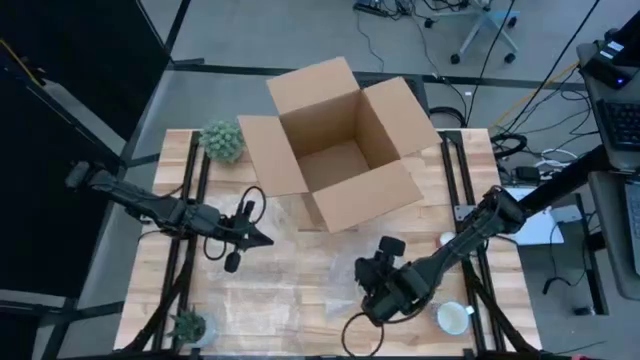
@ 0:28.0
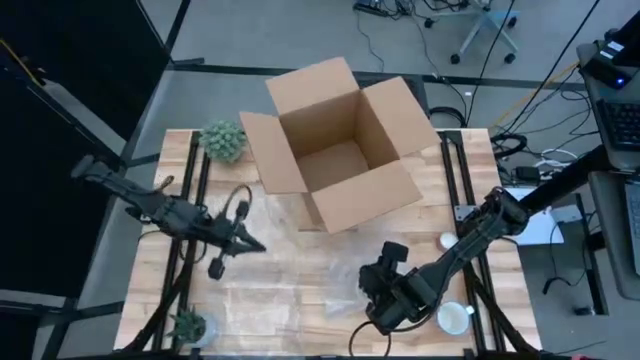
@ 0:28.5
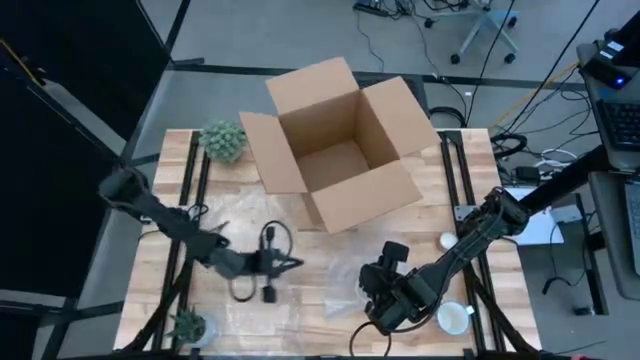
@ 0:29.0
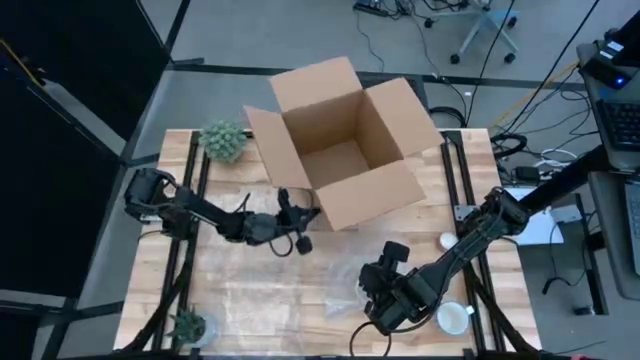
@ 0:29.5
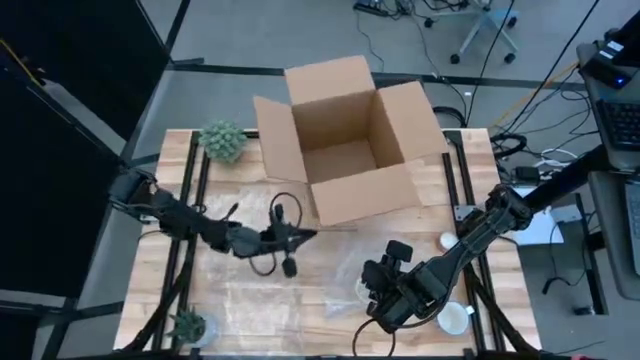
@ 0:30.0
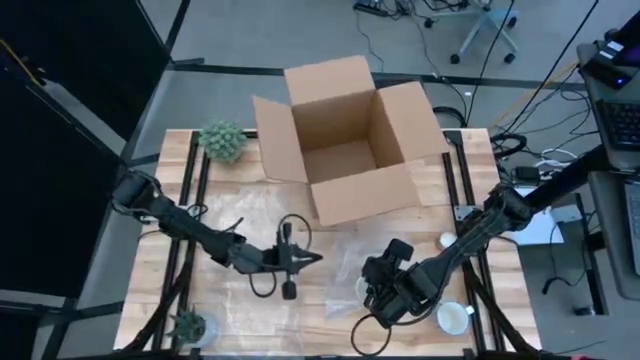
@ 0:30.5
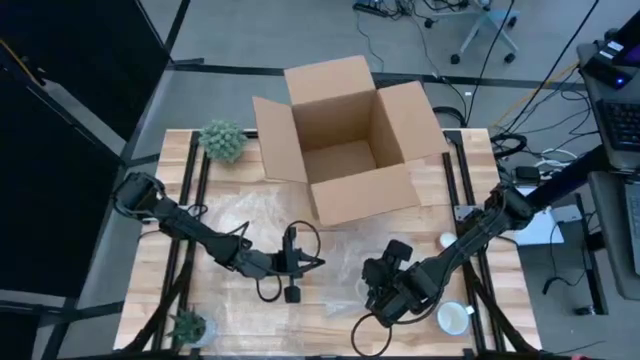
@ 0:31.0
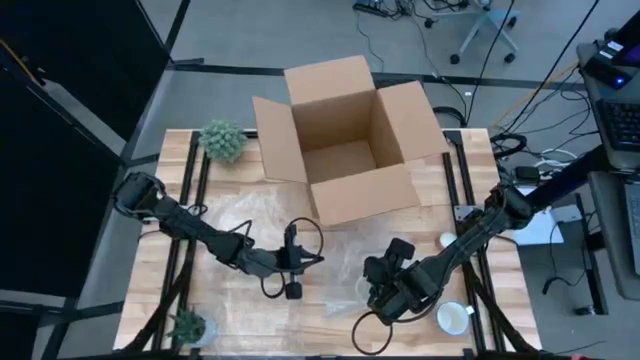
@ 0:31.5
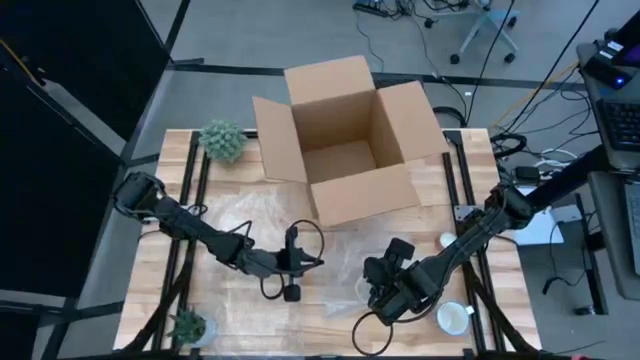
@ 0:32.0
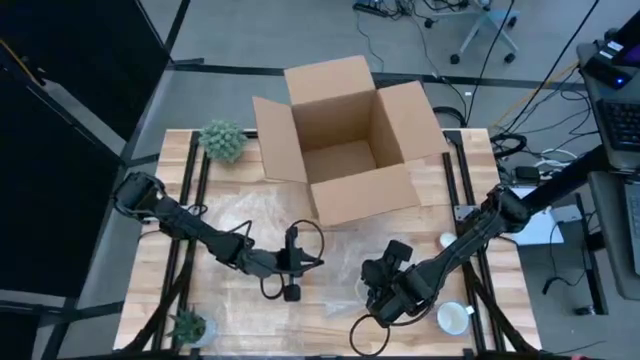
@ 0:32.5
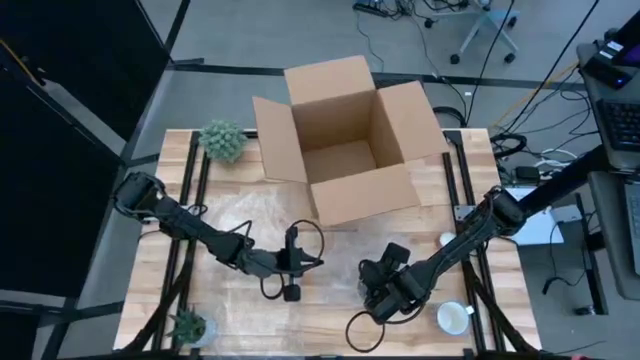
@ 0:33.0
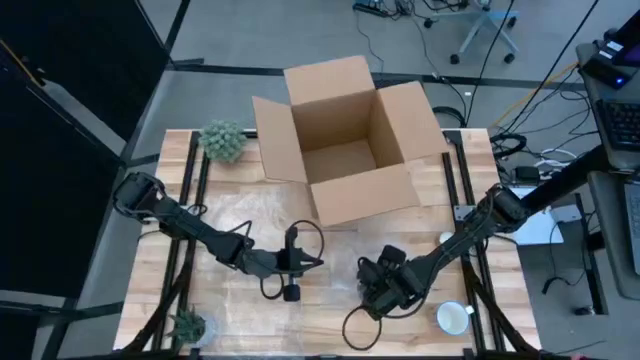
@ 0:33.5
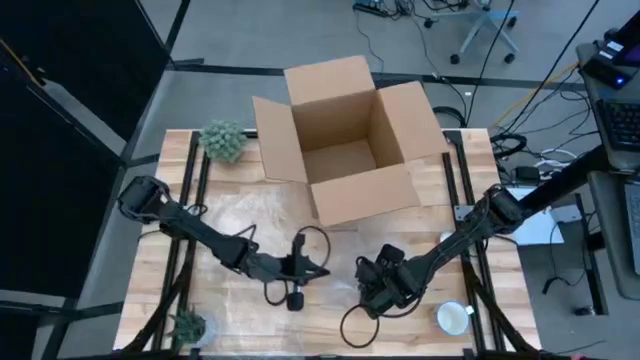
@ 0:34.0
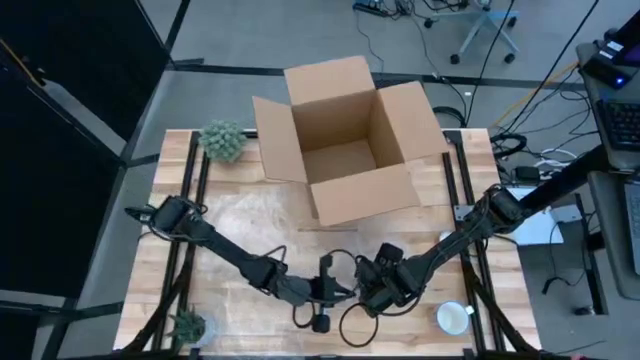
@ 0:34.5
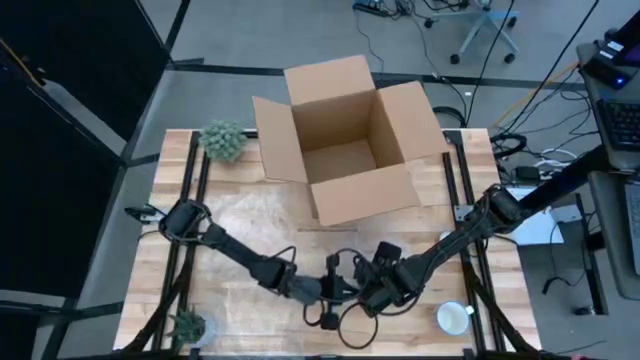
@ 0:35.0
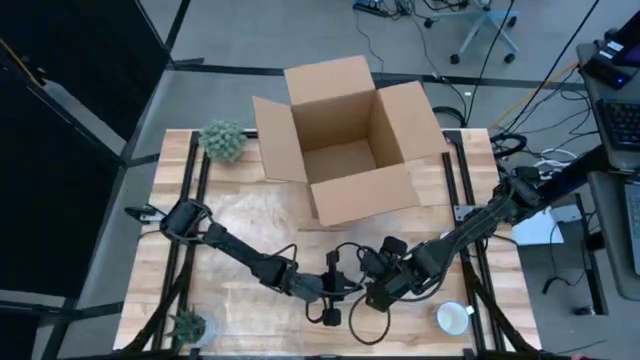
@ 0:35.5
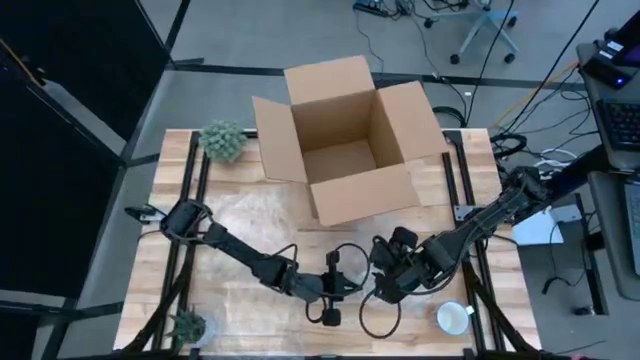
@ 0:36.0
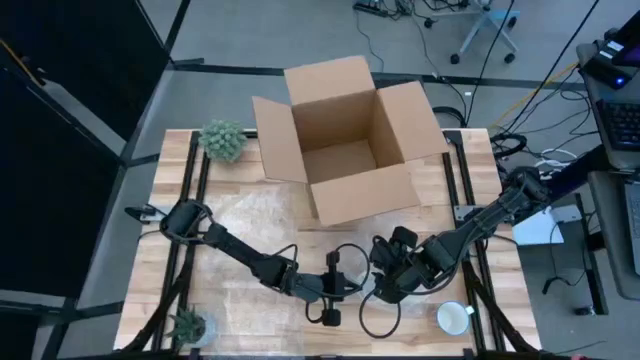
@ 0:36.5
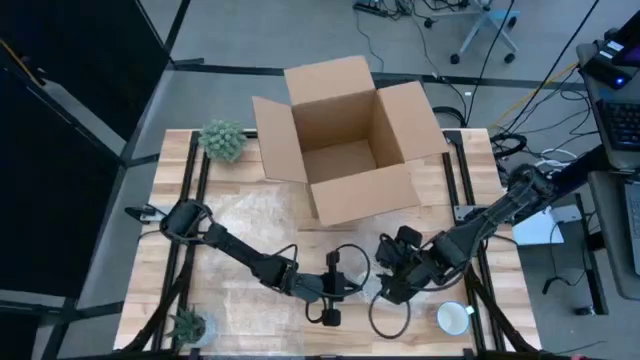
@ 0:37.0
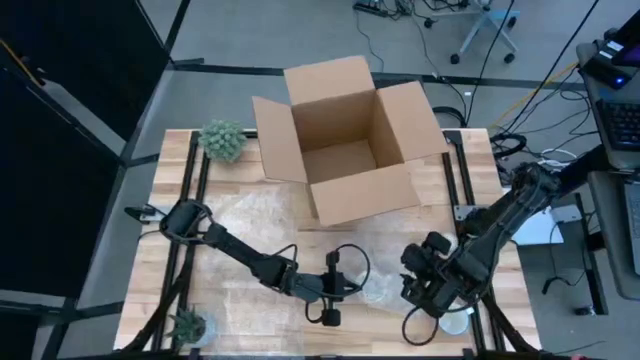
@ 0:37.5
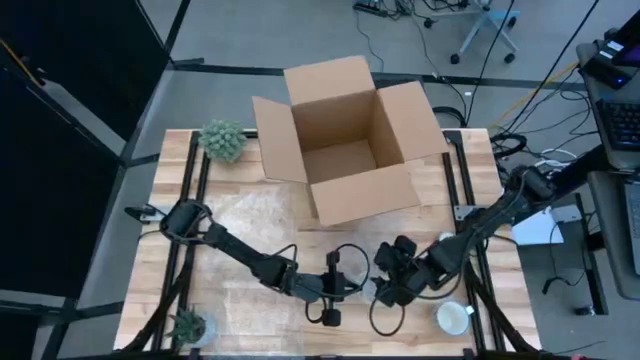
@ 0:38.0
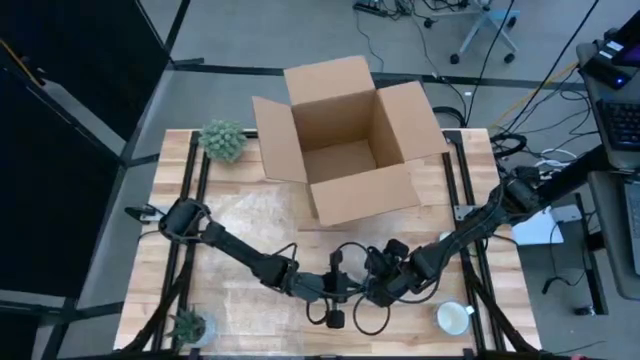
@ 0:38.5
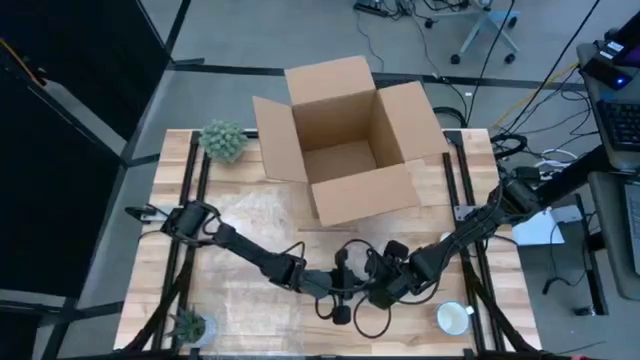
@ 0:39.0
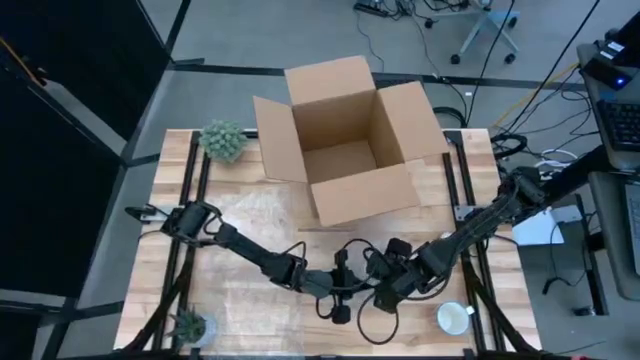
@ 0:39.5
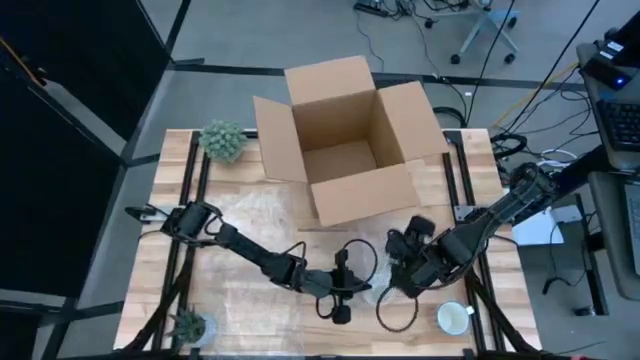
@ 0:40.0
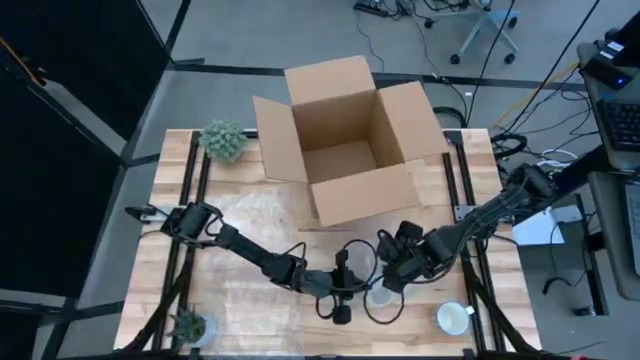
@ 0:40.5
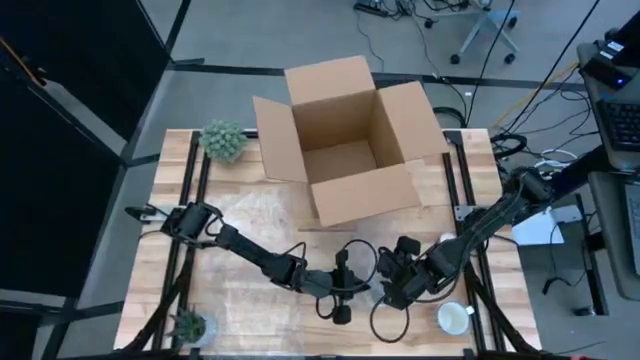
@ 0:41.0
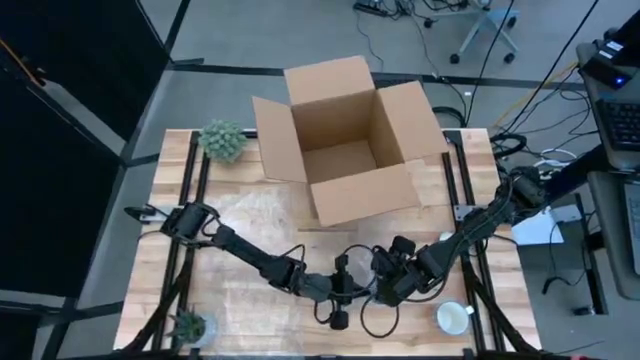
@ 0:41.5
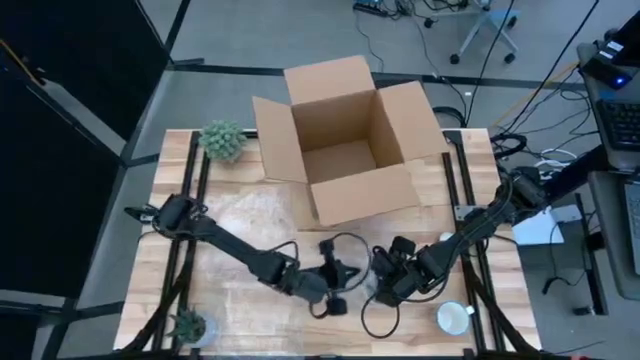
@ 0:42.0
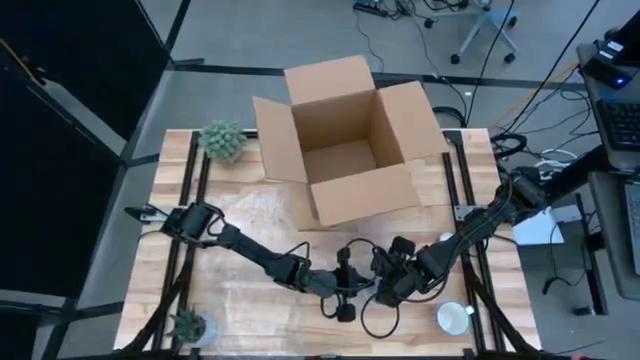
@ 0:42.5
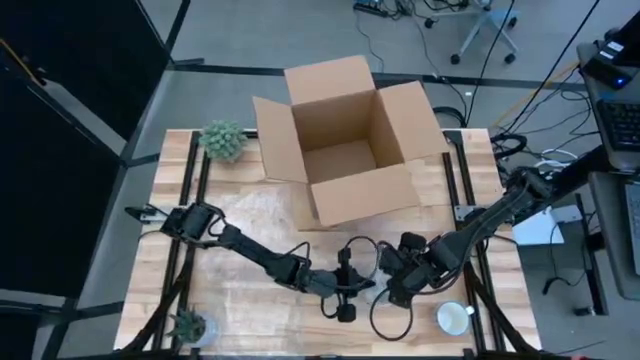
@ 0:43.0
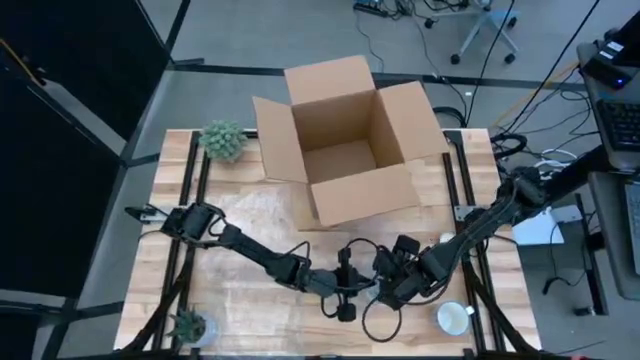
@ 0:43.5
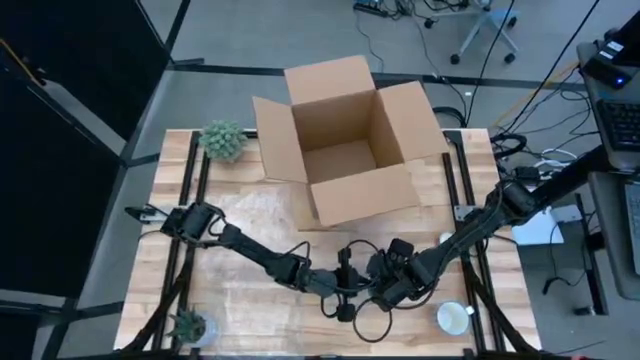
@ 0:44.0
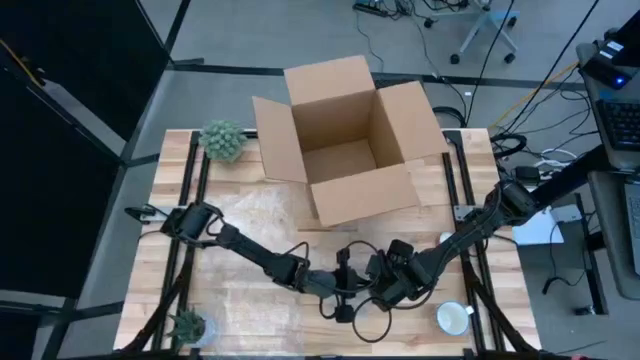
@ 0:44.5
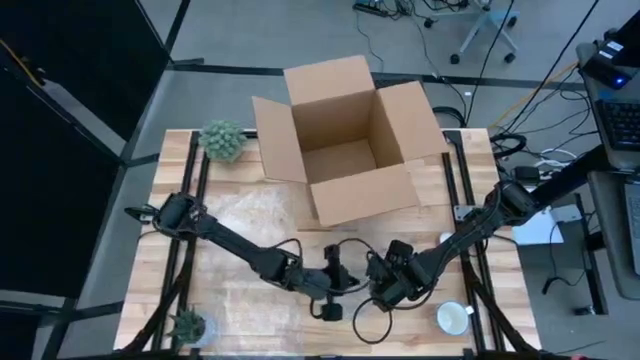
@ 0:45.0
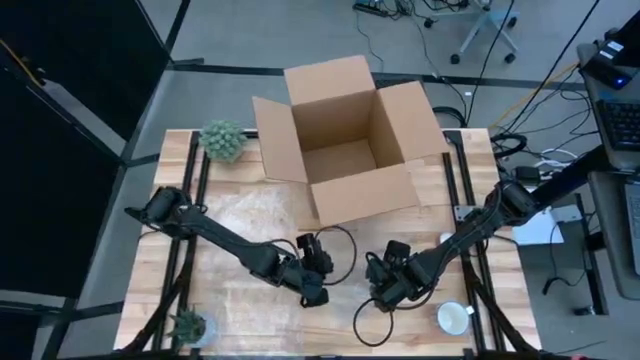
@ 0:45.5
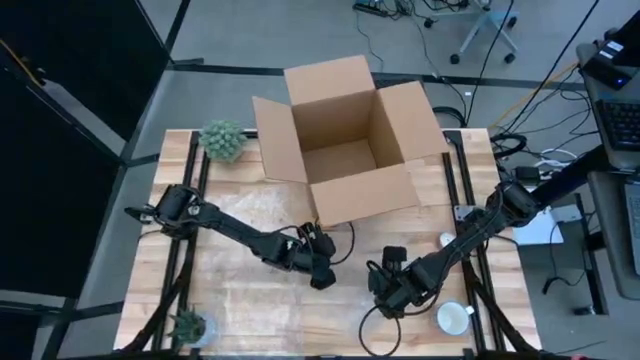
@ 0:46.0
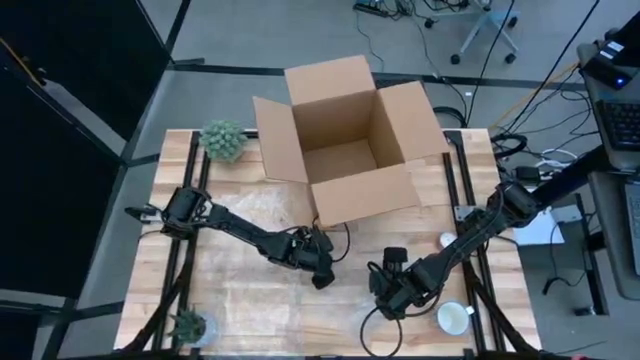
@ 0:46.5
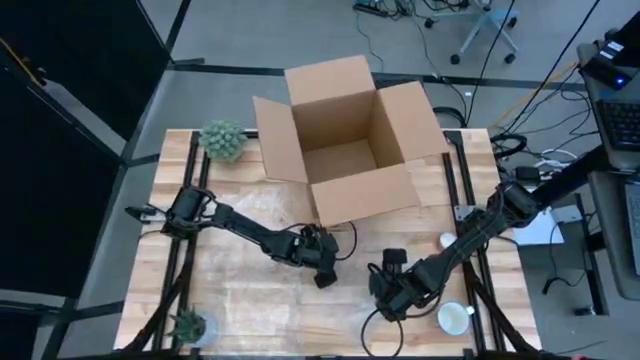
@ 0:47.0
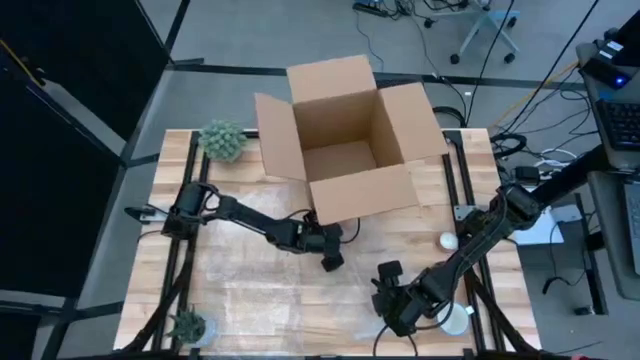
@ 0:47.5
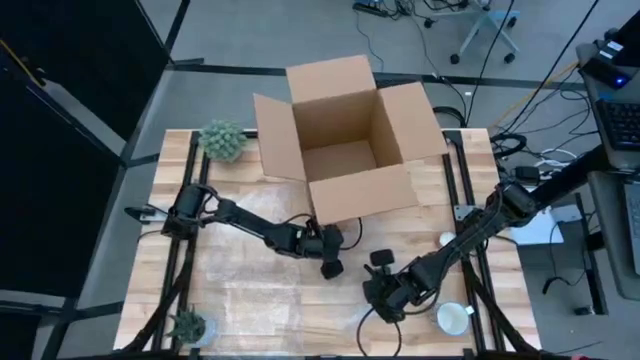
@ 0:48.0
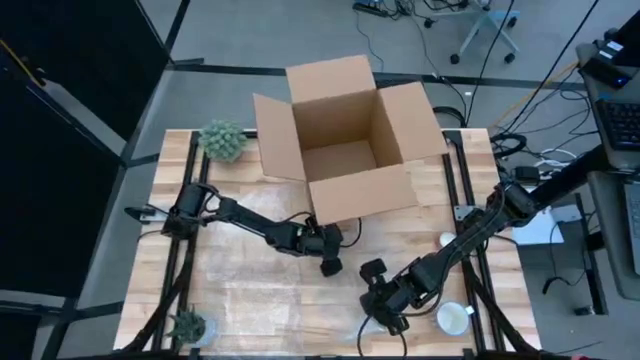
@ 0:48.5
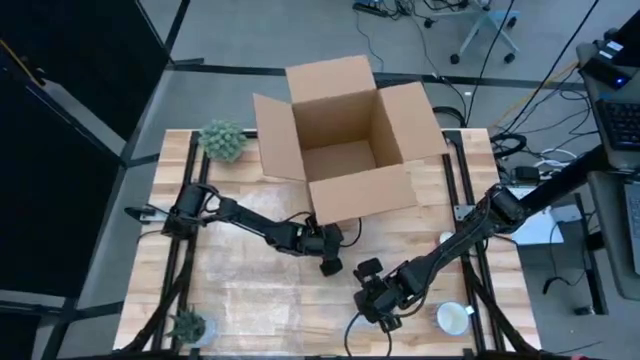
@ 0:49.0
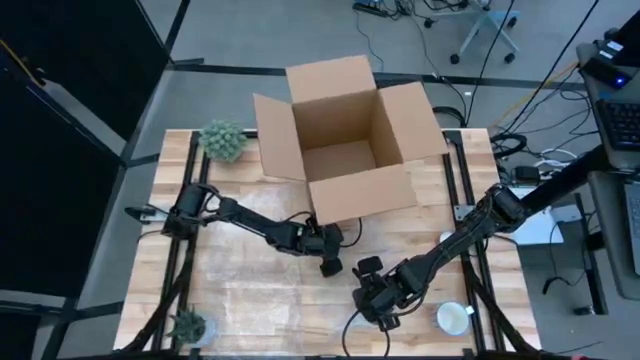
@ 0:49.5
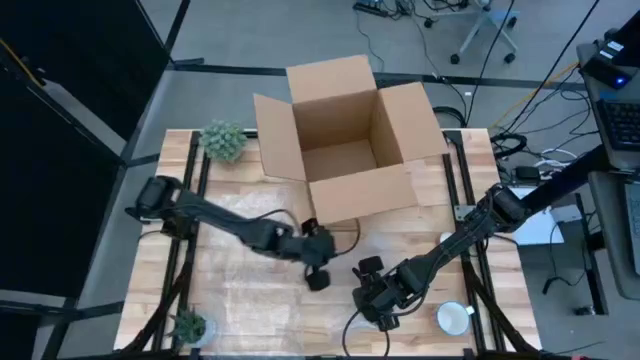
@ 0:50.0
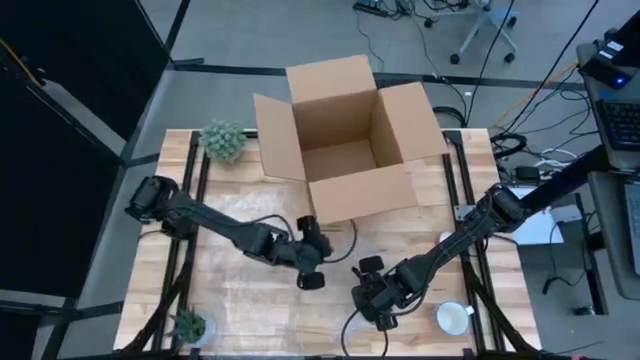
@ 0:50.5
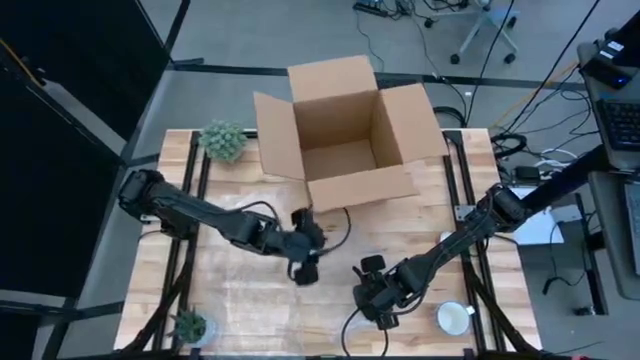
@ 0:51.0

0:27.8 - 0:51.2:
Task: wrap mug
Wrap the orange mug with bubble wrap
